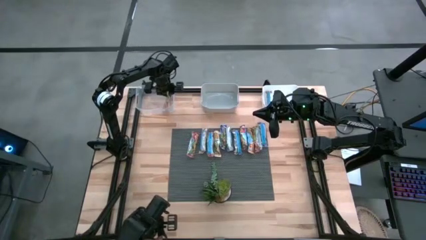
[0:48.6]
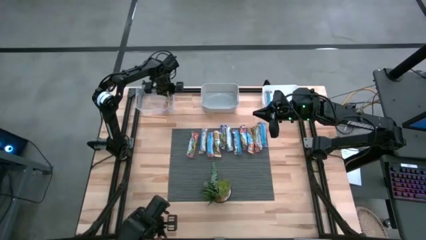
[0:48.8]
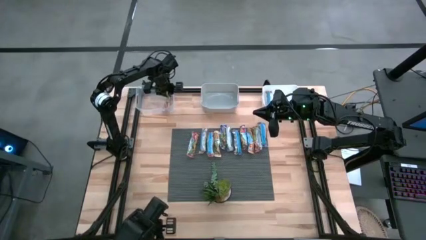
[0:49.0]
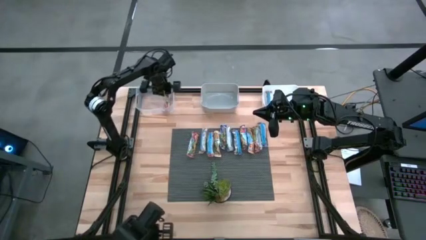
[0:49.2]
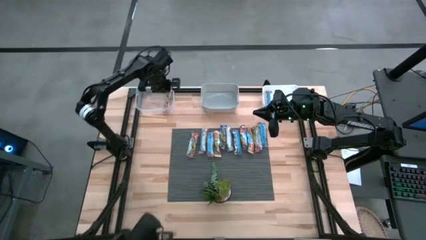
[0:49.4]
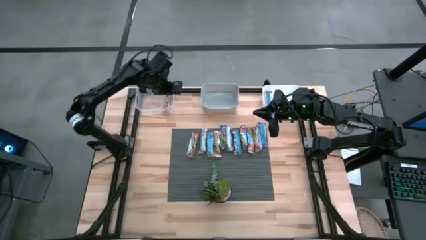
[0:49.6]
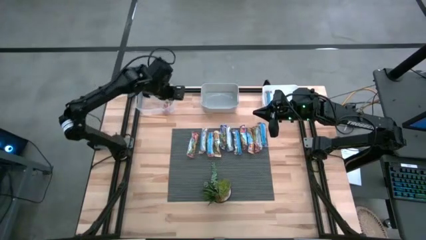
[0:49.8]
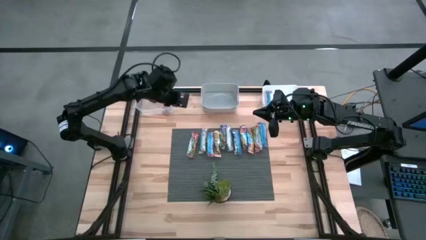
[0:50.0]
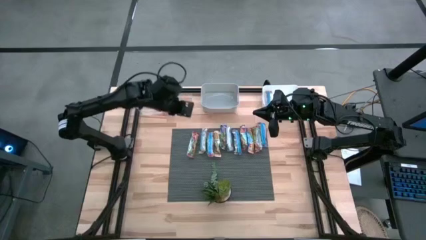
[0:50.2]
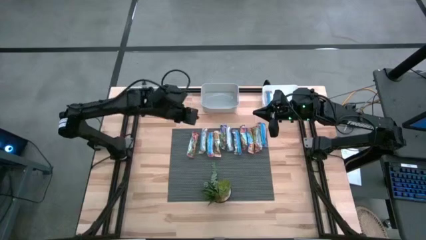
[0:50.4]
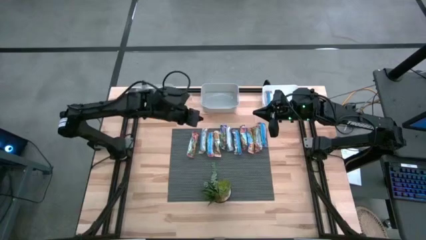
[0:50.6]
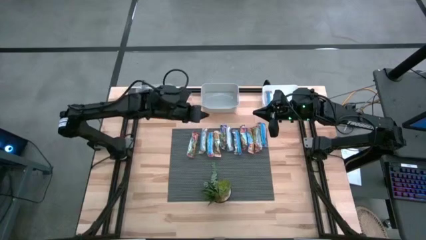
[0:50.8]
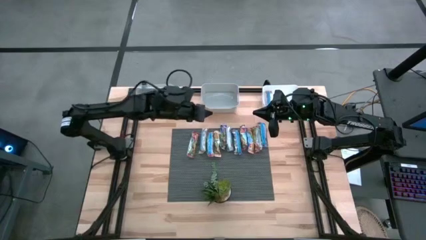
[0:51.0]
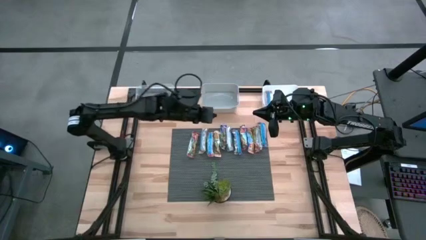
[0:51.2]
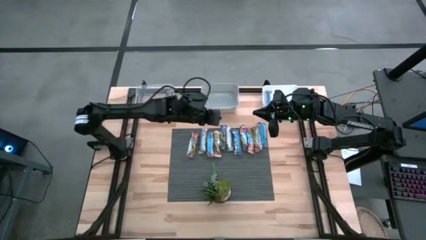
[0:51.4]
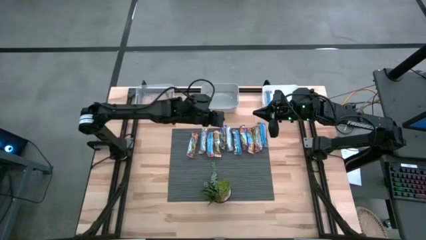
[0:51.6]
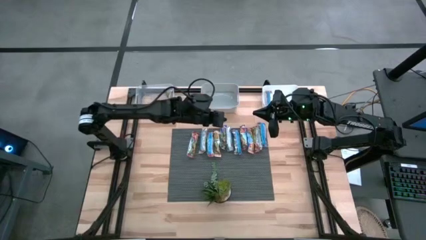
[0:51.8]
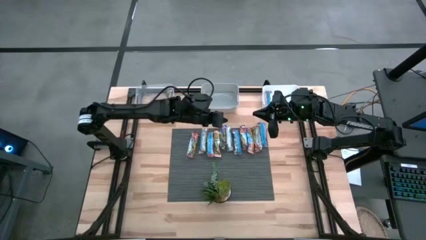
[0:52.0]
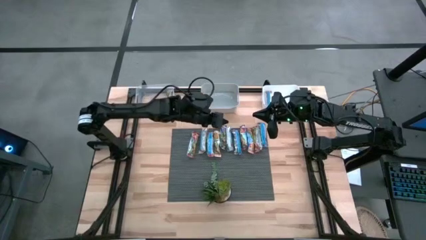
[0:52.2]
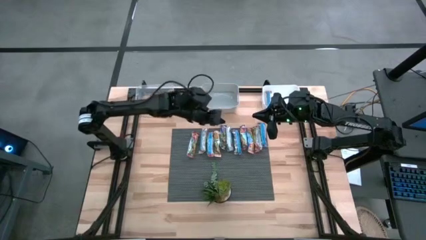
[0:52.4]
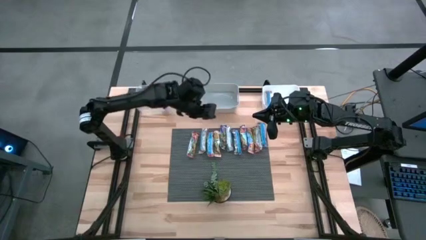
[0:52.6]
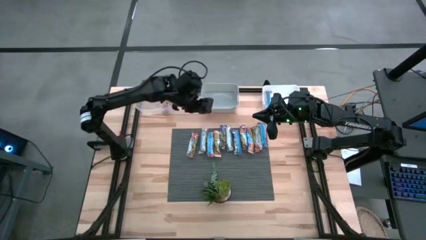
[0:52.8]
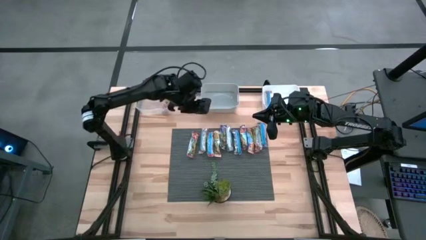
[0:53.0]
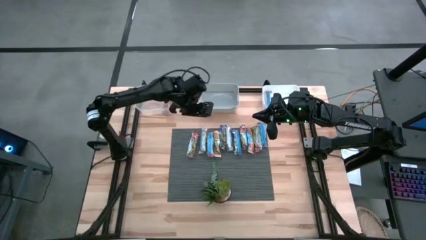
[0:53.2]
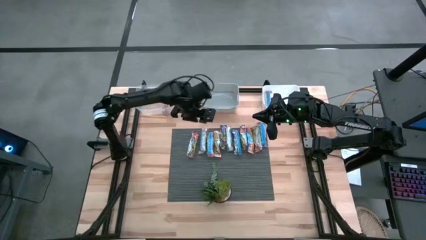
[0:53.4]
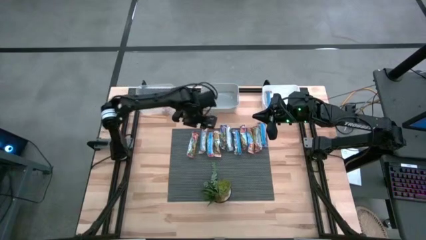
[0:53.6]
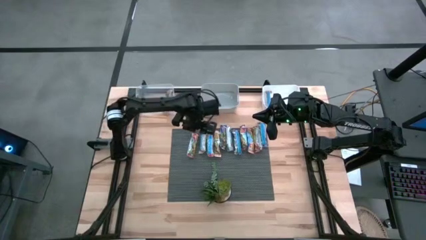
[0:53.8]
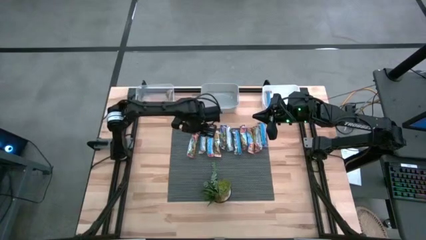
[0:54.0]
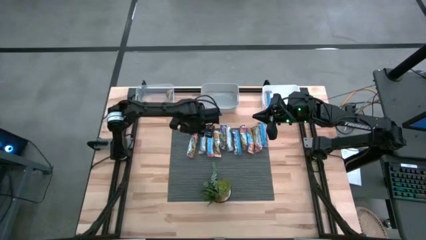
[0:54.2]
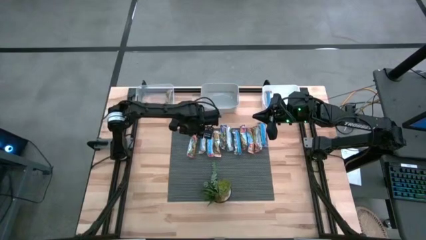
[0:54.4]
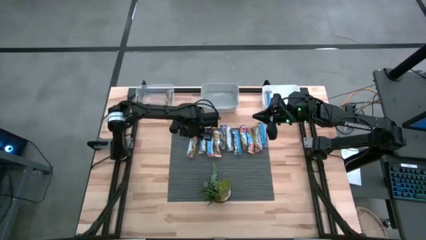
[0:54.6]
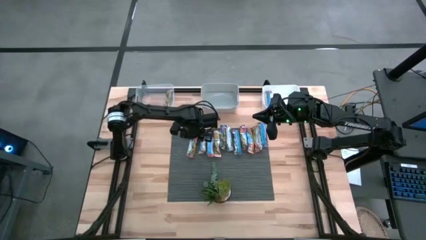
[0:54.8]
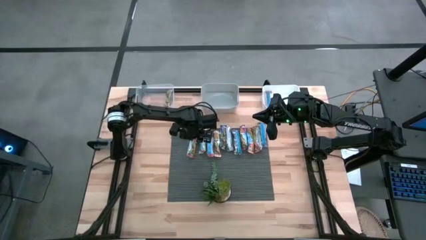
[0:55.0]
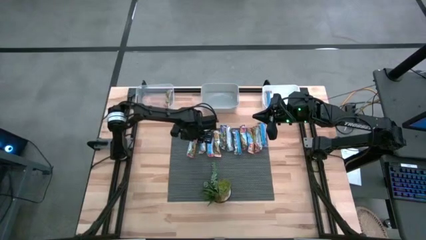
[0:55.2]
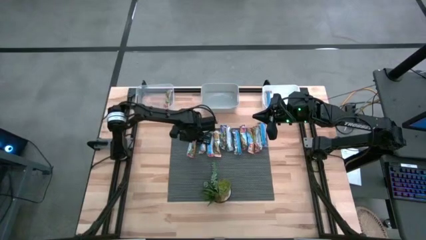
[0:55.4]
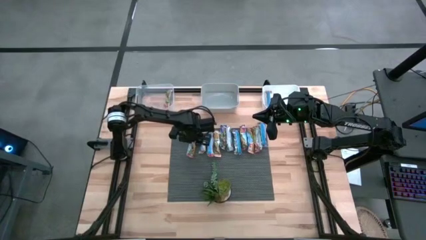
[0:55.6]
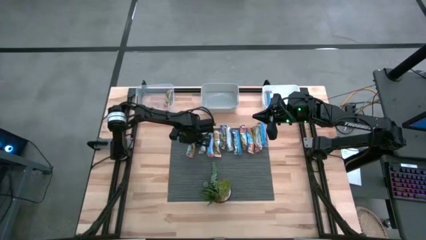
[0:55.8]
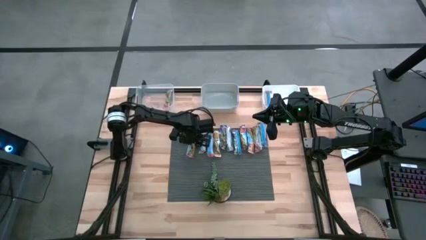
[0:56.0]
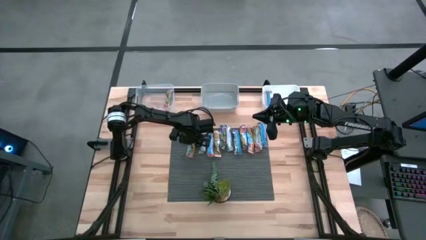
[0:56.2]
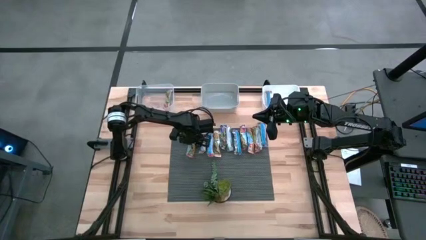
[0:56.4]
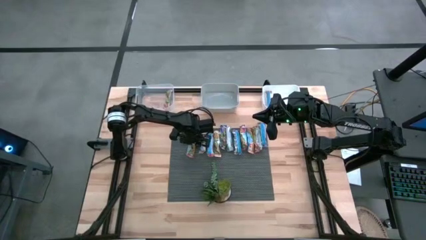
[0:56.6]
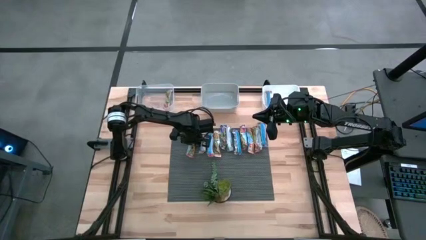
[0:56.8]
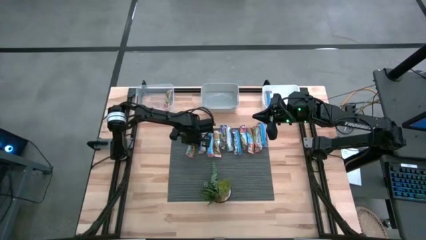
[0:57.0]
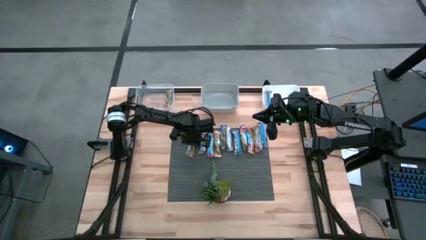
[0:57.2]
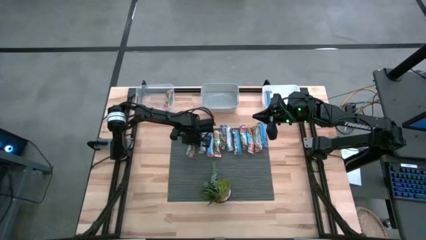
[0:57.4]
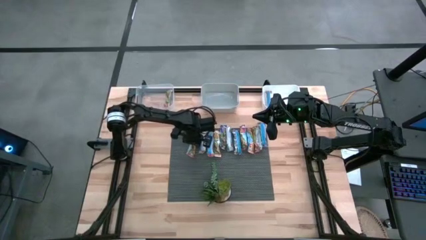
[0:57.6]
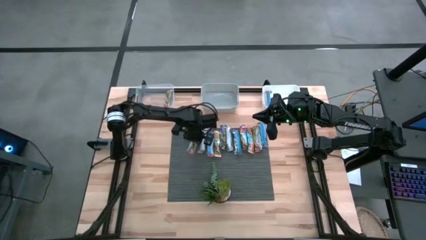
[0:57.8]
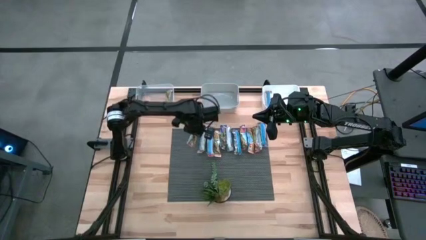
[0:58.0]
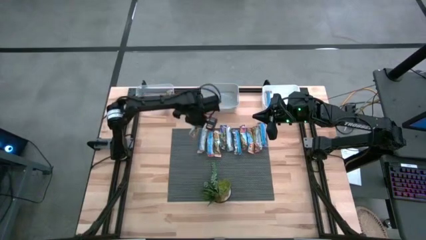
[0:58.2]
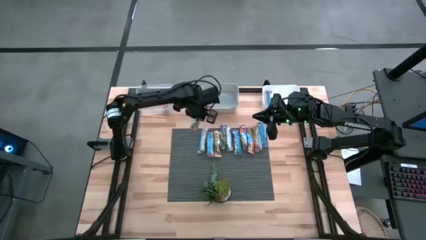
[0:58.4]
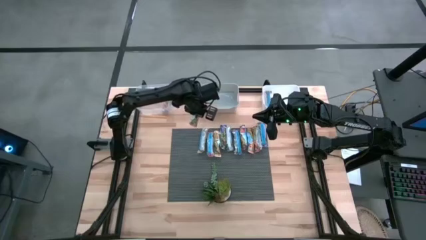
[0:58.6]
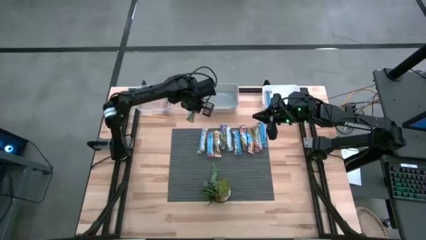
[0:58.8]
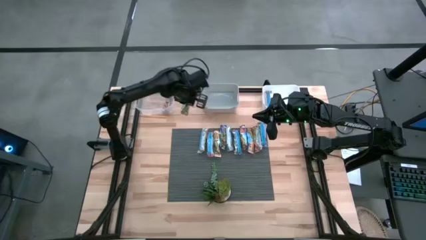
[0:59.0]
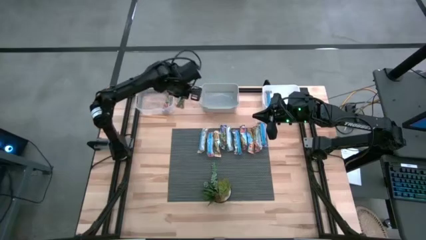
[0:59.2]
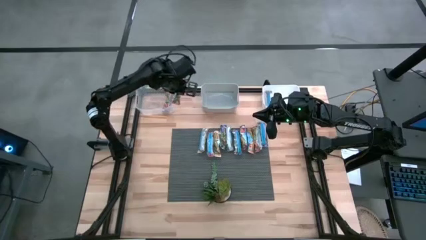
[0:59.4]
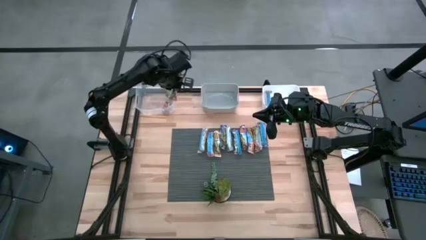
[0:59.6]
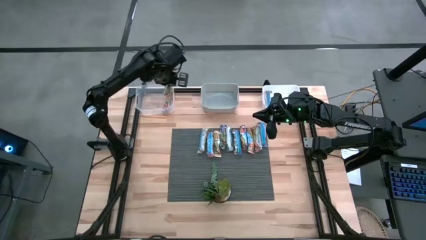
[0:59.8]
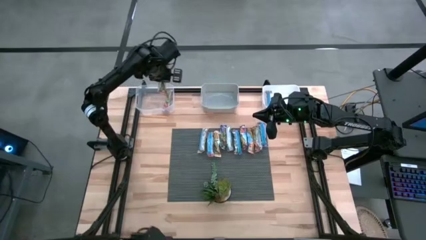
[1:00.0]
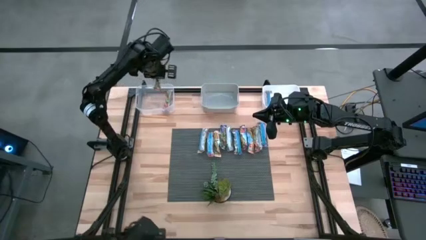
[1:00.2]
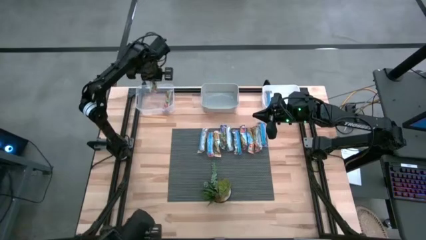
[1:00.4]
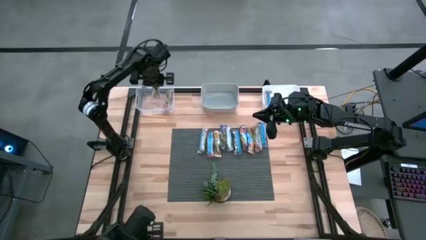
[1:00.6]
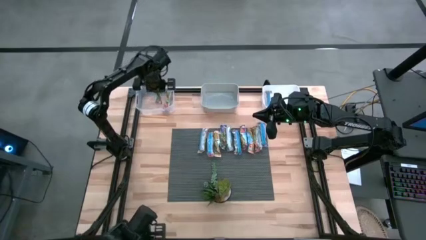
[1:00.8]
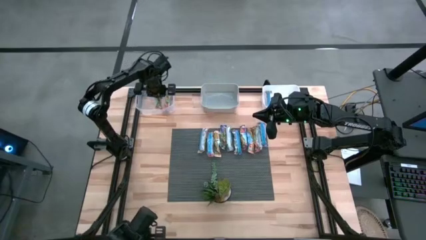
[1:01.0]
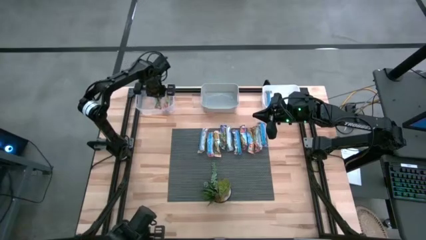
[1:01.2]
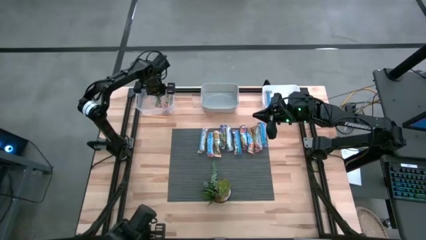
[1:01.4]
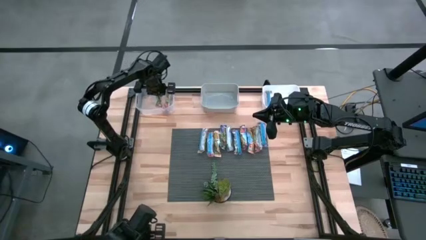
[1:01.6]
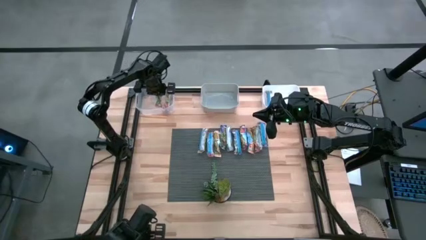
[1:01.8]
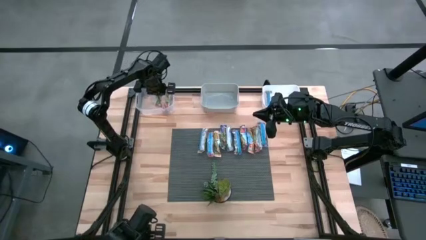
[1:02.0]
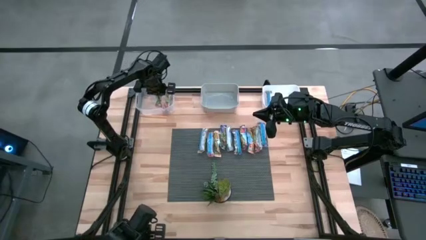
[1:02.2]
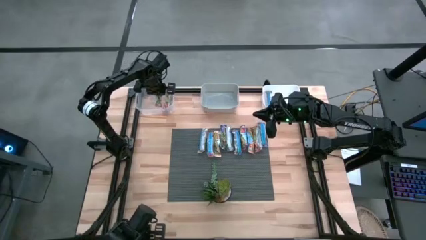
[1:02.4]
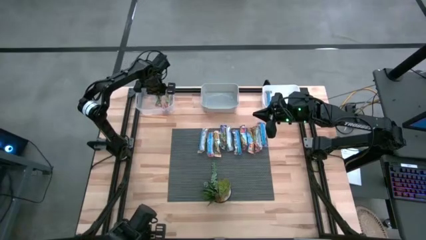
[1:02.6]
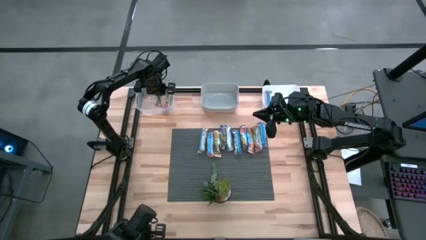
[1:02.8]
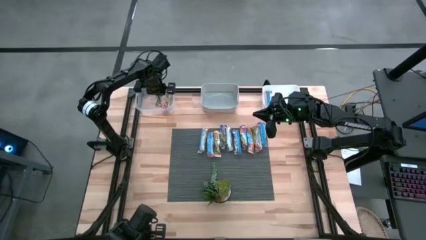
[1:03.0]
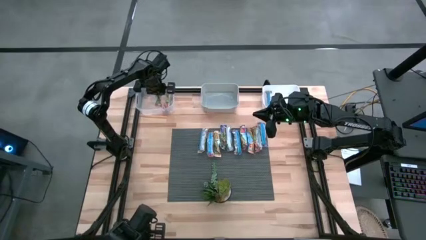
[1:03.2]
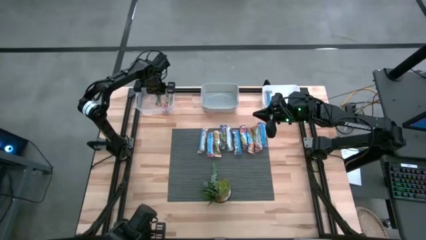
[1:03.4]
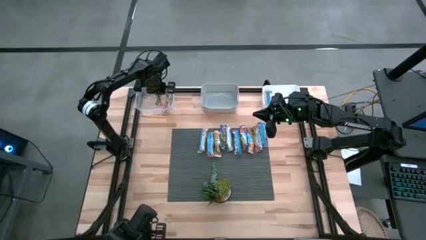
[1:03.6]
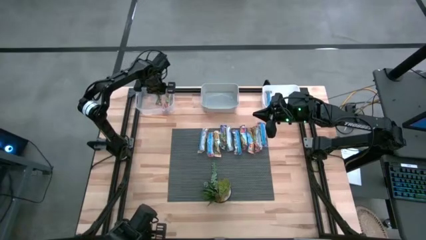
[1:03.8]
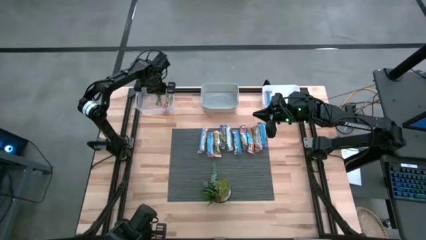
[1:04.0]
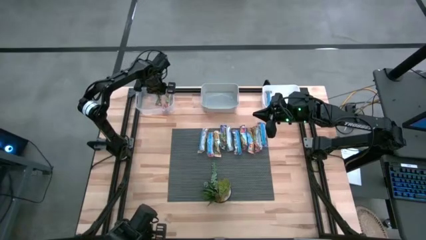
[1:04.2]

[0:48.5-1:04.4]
Task: Pick and place Granola Bars by type
Put the red granola bar into the transparent bin

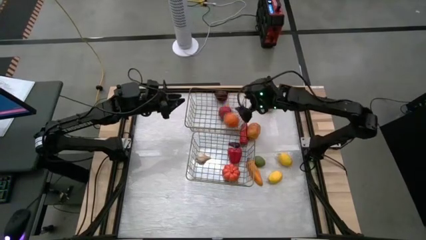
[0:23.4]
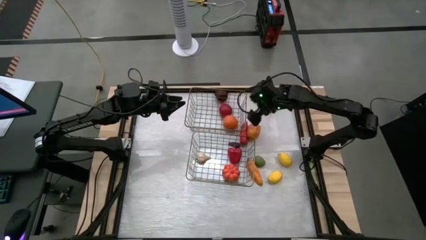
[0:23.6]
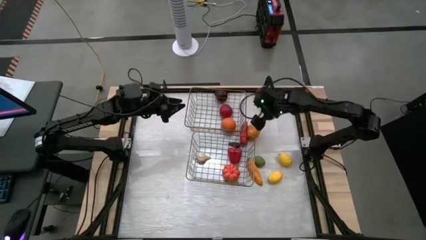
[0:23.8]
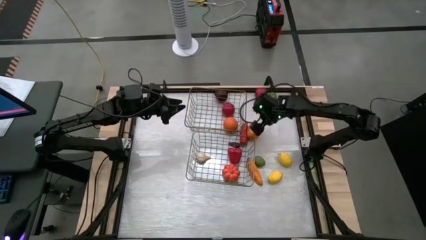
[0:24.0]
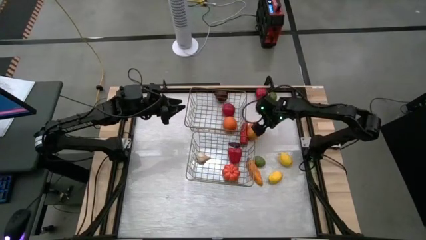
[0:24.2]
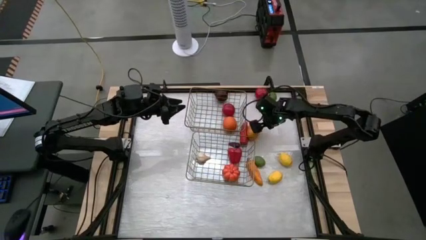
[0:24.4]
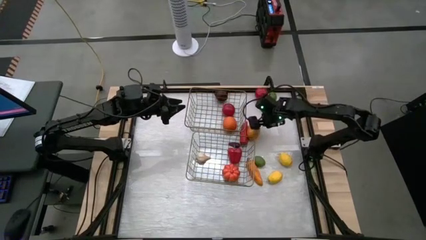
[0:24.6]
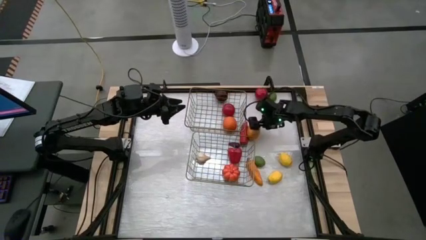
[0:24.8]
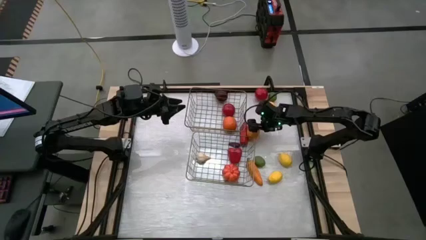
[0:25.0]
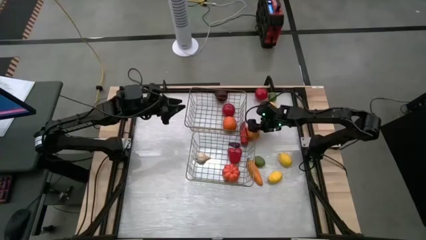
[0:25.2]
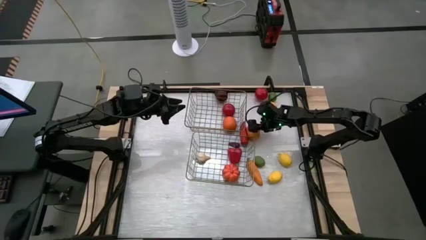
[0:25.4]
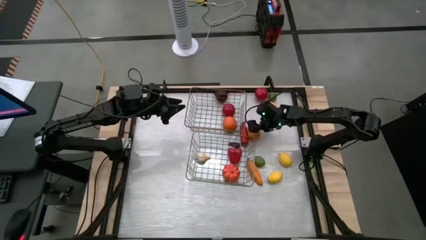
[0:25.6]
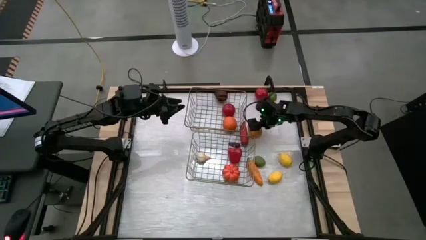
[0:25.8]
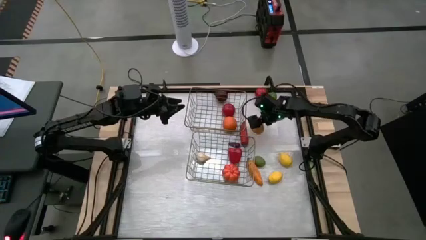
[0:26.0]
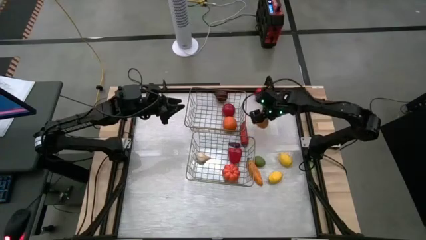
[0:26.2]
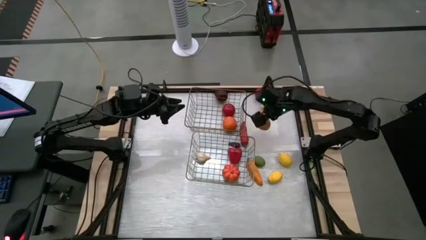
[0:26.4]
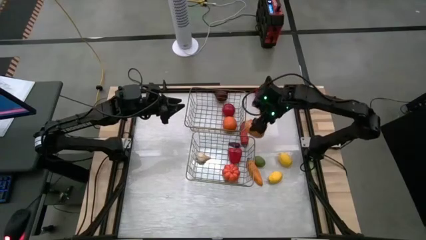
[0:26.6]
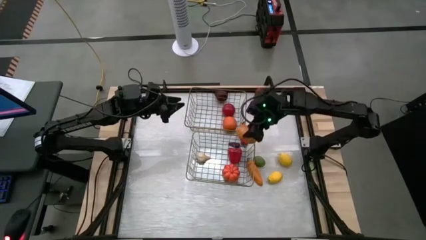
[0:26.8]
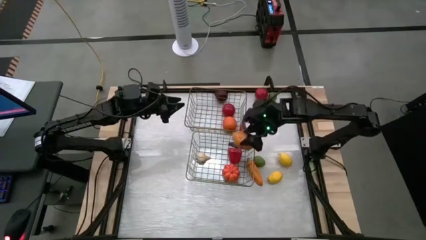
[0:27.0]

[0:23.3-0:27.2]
Task: Sort produce into baskets
Put the brown potato vegetable into the bottom wire basket
